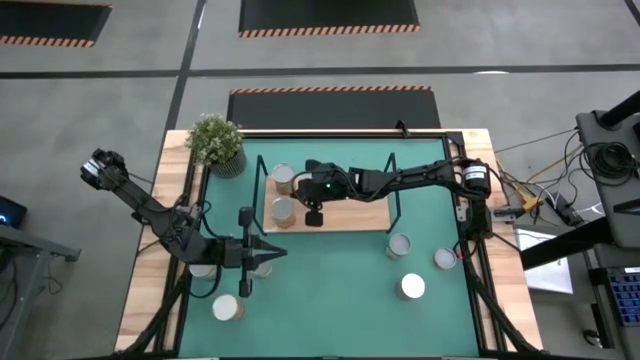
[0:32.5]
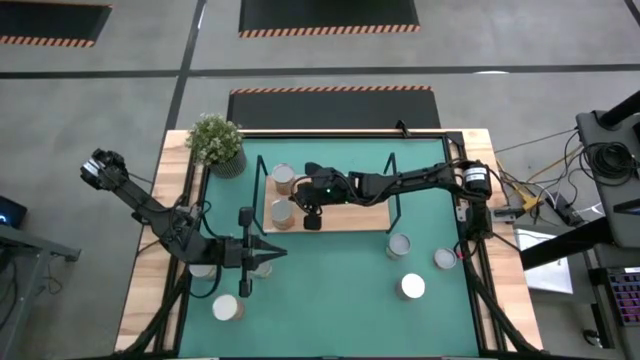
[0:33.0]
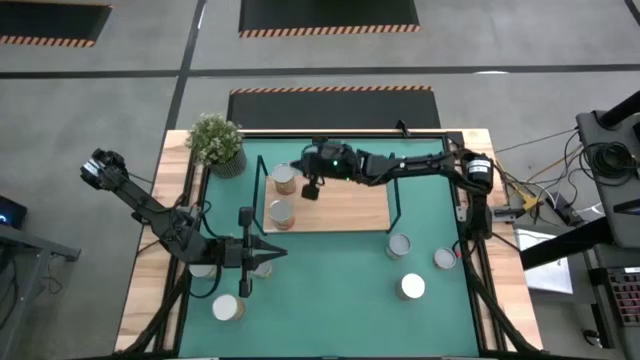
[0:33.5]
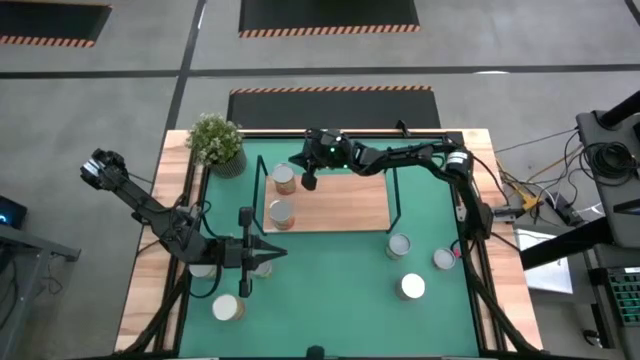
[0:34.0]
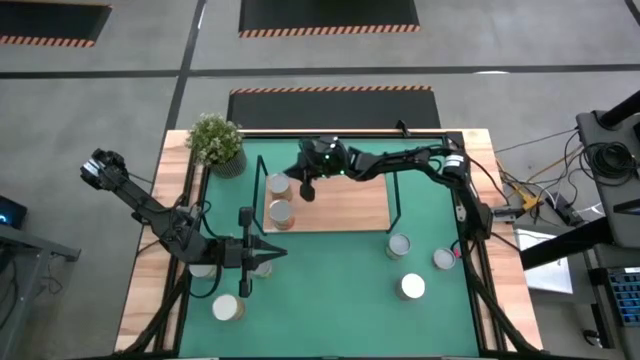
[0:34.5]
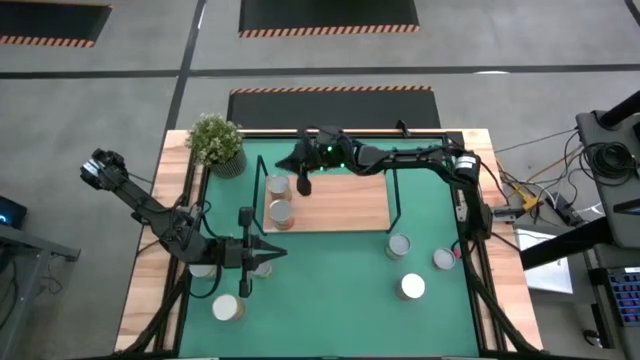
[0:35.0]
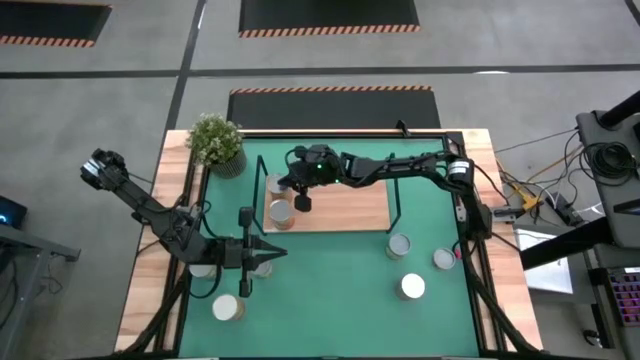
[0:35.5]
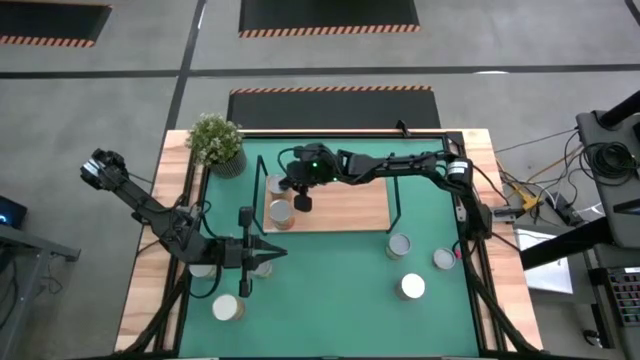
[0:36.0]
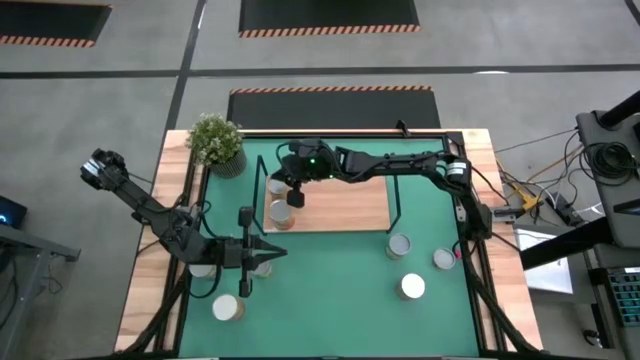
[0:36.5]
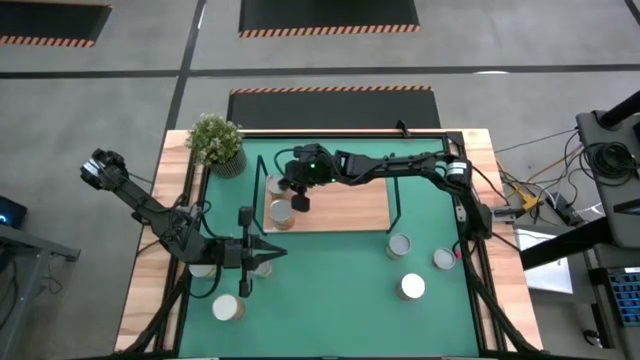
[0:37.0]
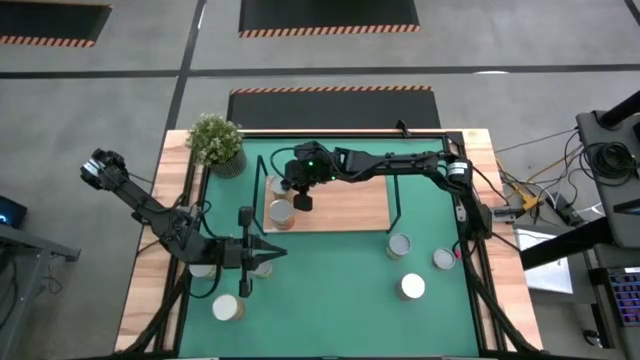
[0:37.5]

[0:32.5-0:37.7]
Task: Pick and place cans onto a shelf
Adjust the canned green beans on the shelf

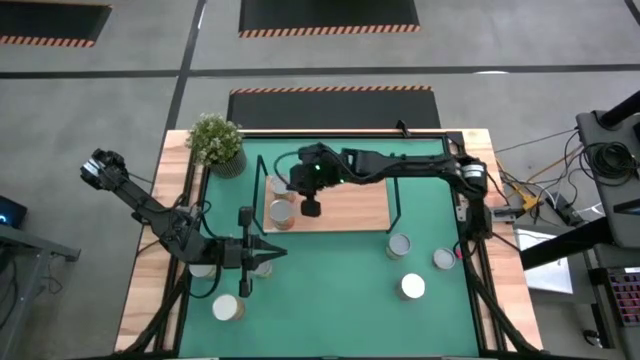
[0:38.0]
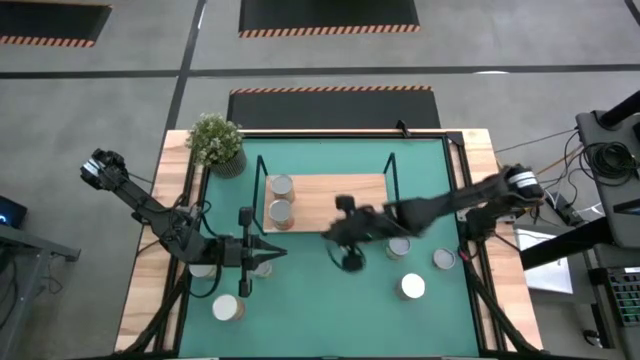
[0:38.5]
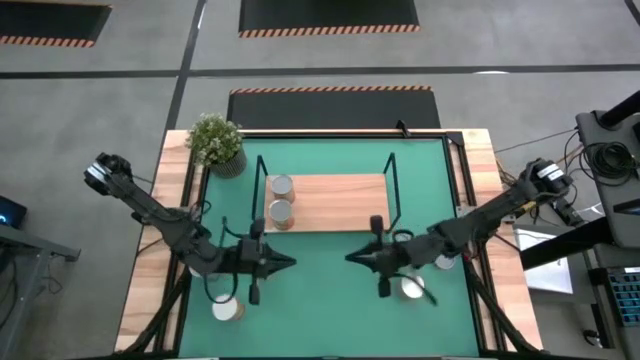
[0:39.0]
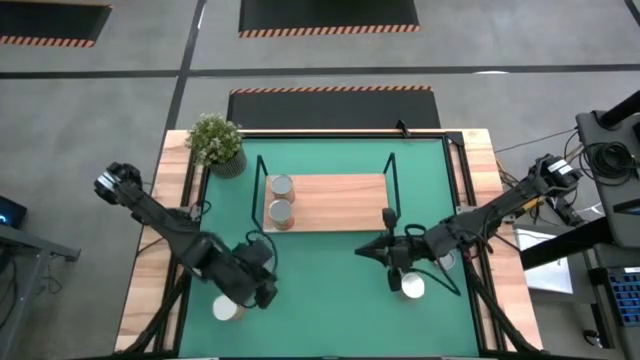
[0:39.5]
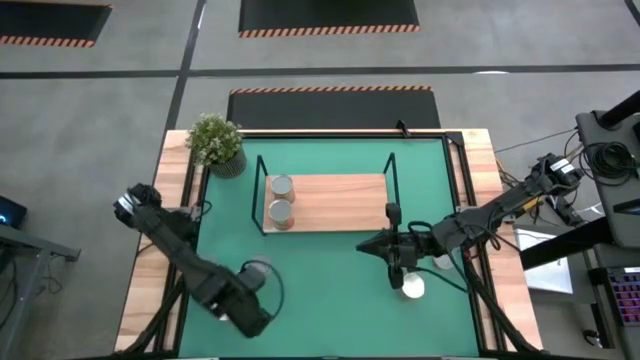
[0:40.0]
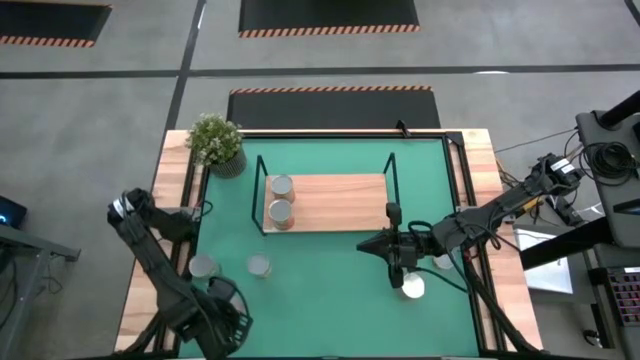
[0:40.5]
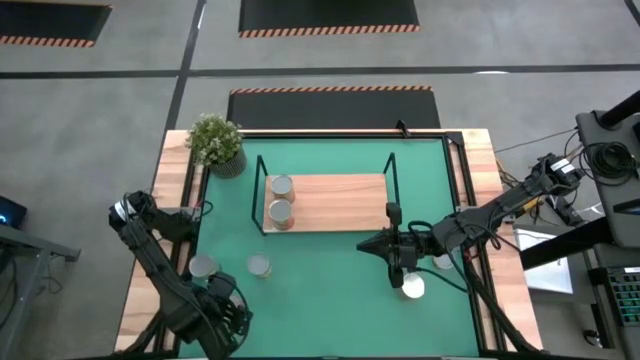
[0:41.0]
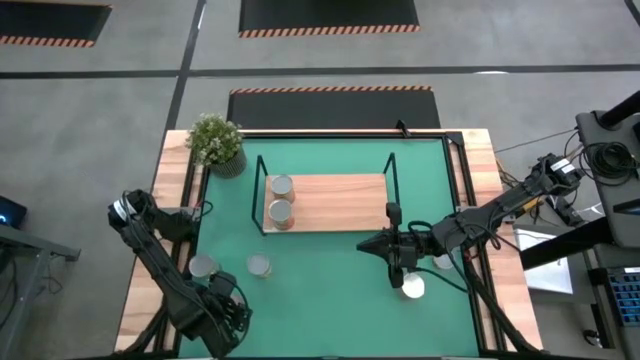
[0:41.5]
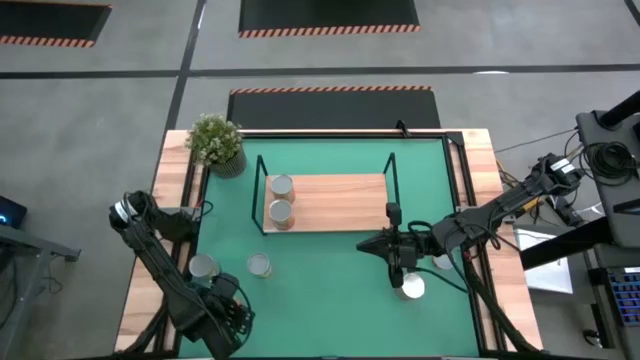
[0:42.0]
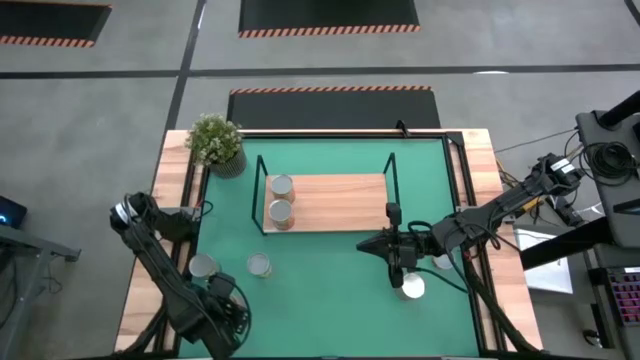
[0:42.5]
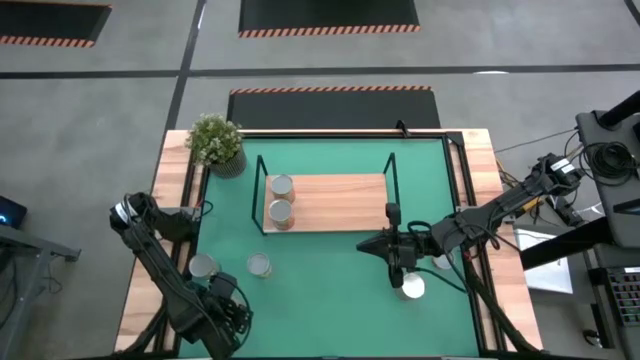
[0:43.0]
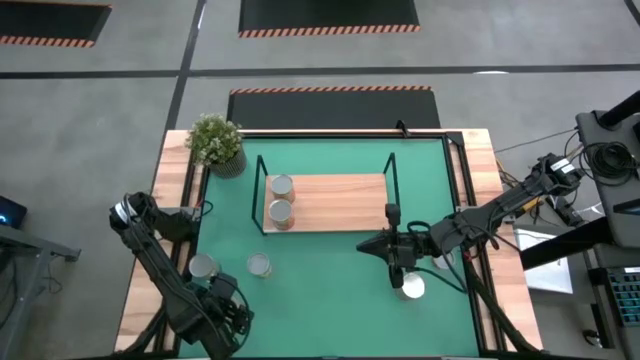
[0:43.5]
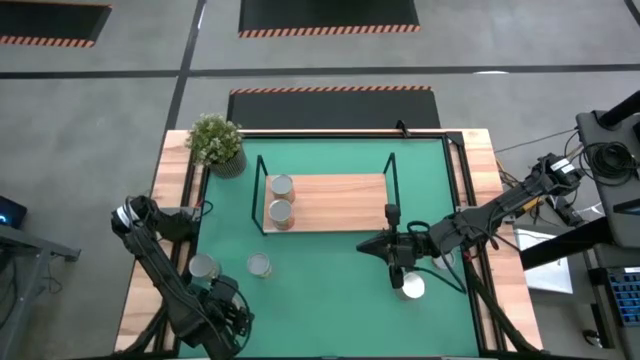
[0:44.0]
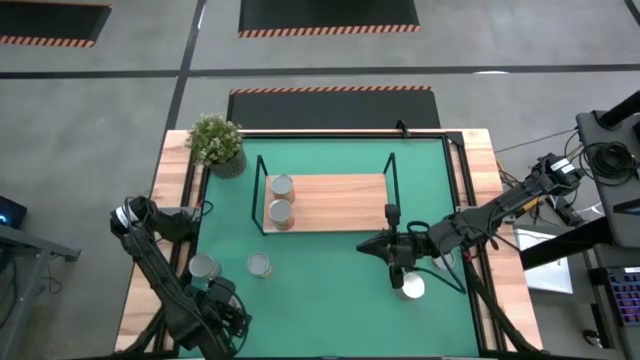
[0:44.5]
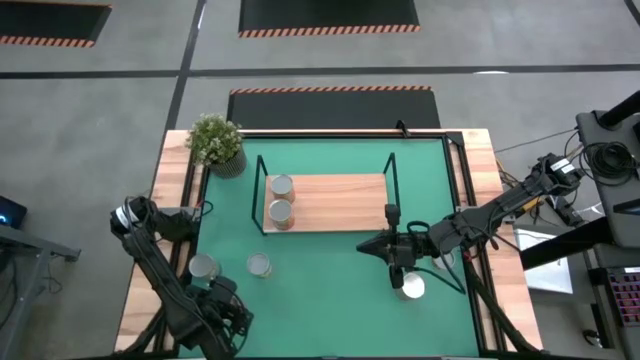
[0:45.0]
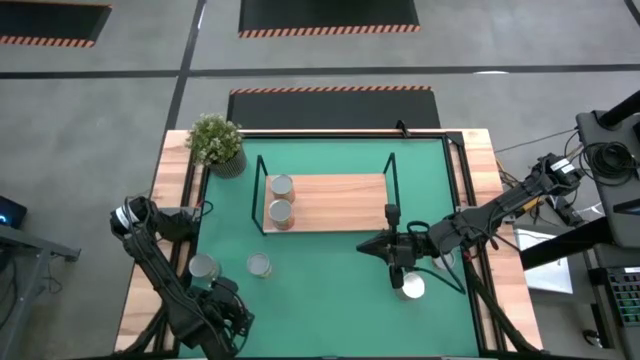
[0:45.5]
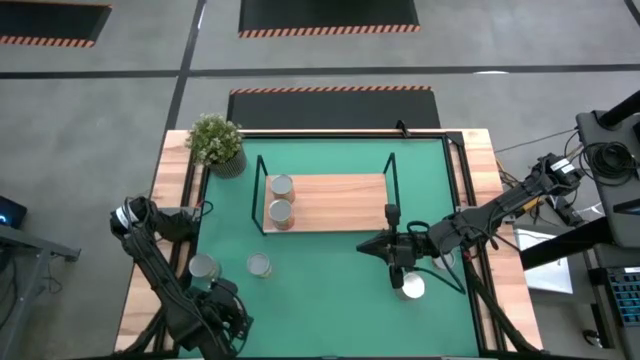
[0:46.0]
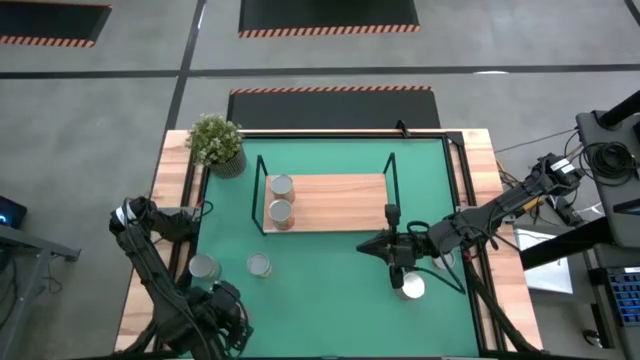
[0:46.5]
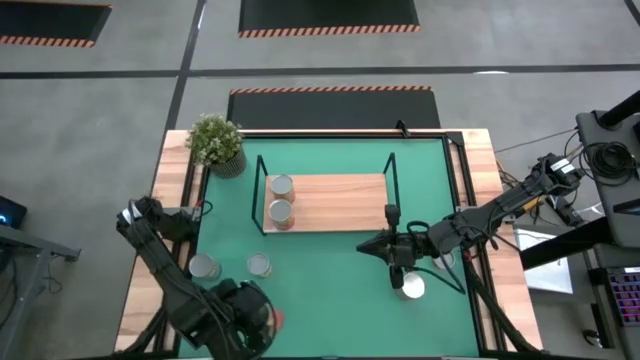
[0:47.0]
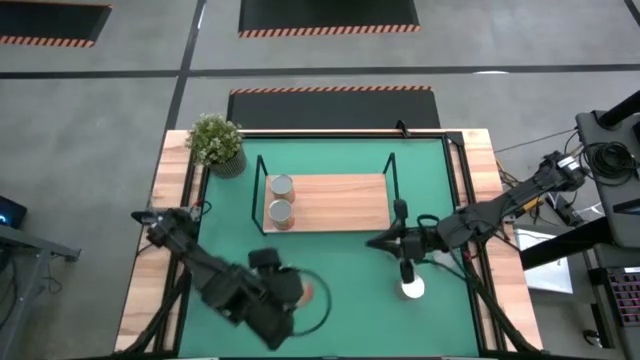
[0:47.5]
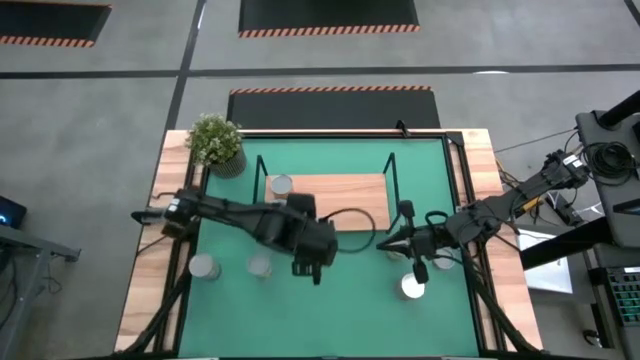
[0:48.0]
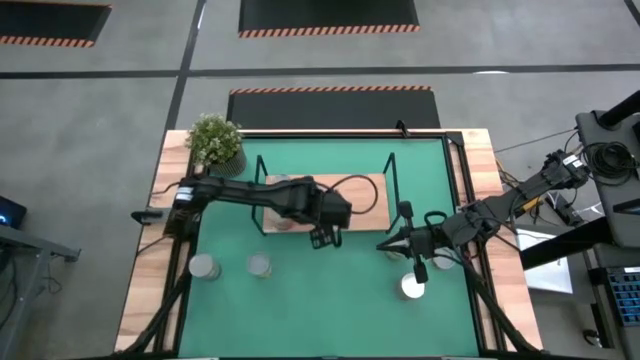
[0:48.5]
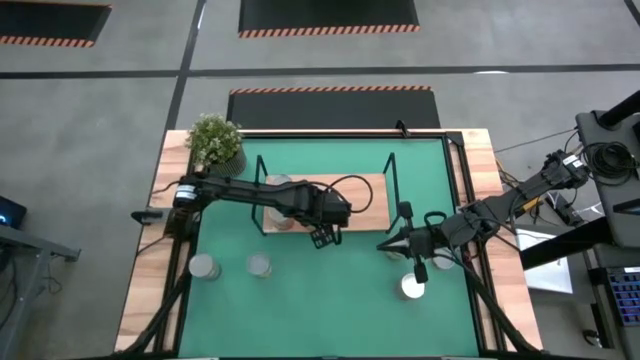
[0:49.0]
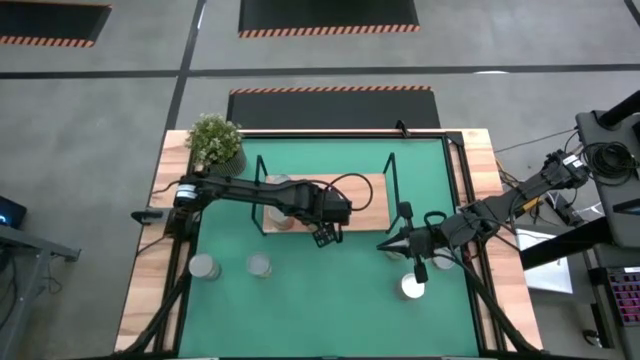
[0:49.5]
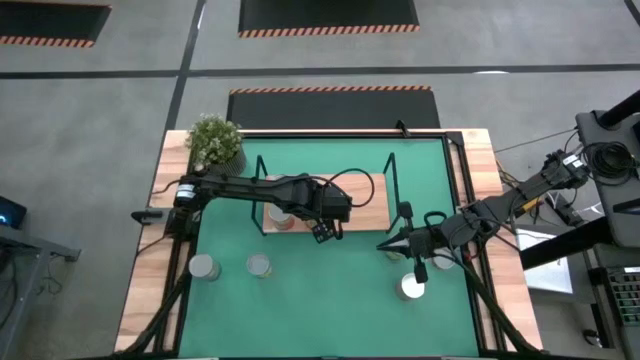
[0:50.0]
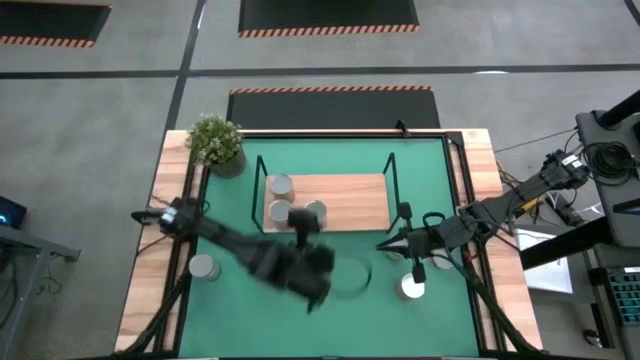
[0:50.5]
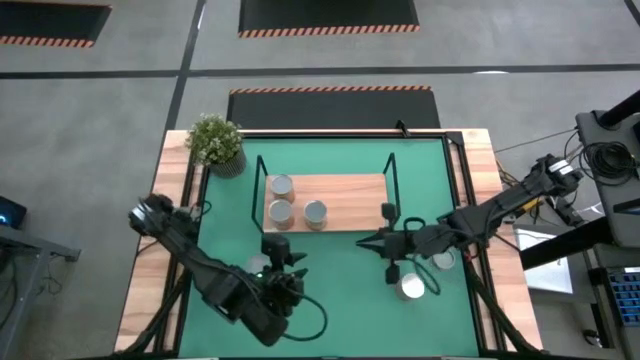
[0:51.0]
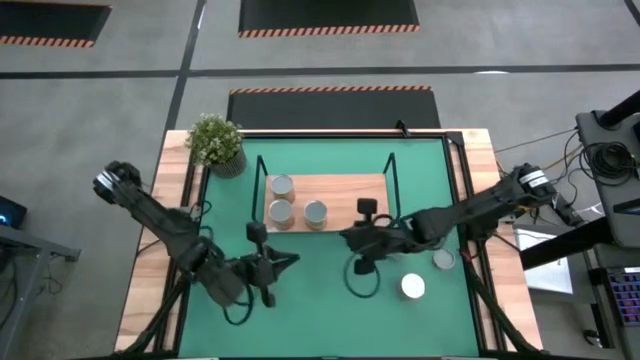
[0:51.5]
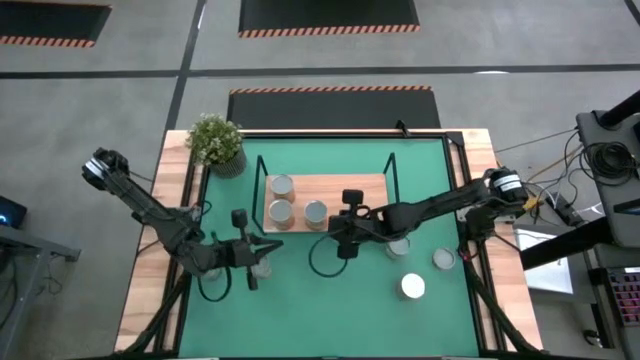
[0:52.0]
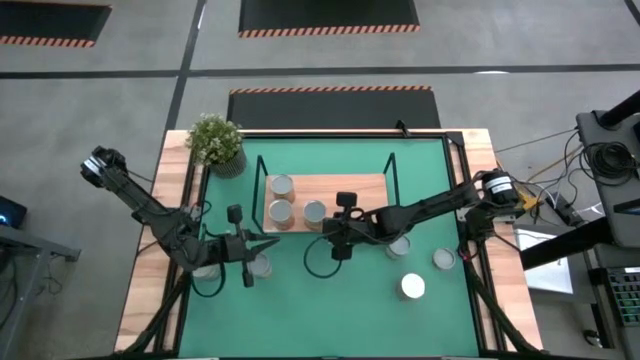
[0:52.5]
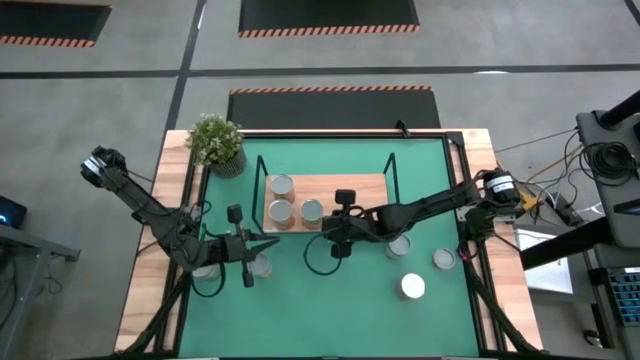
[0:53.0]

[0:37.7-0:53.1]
Put the bottom canned corn on the shelf
